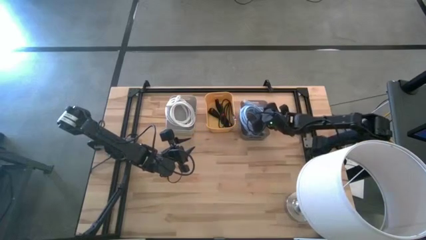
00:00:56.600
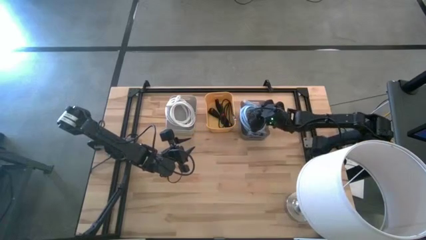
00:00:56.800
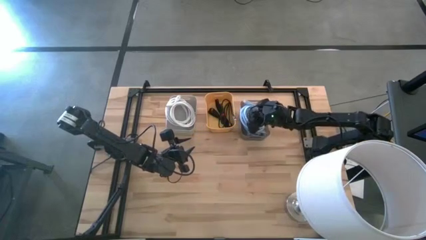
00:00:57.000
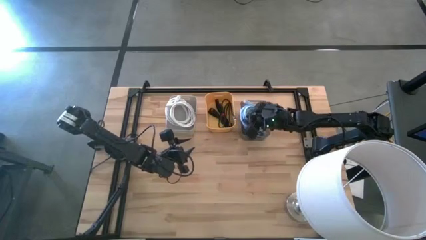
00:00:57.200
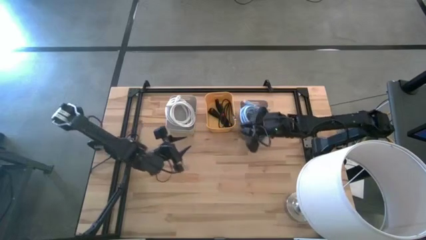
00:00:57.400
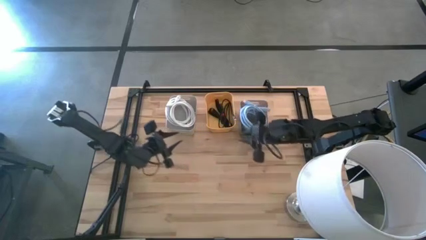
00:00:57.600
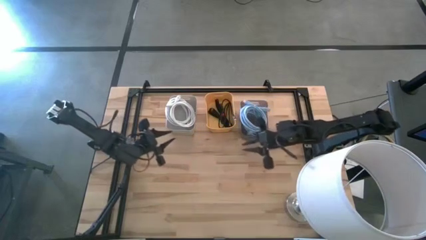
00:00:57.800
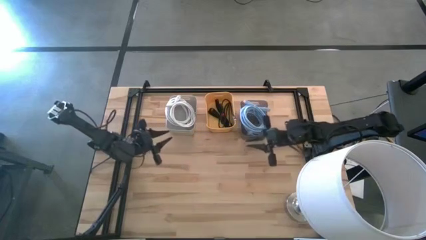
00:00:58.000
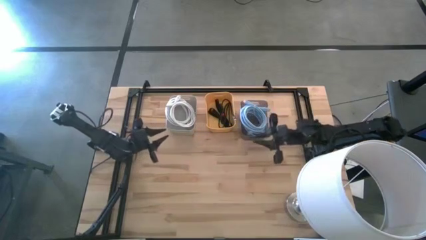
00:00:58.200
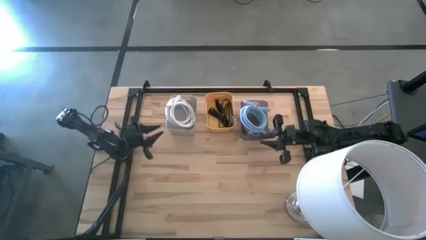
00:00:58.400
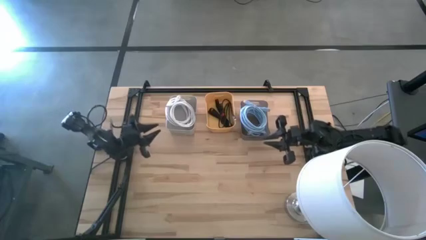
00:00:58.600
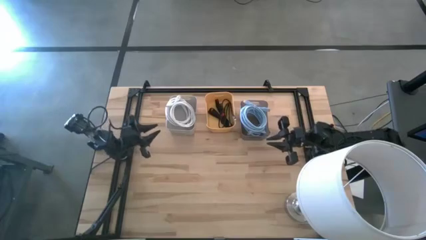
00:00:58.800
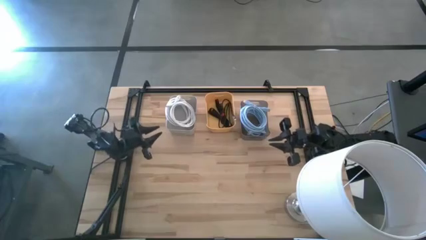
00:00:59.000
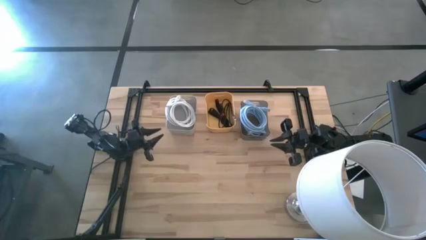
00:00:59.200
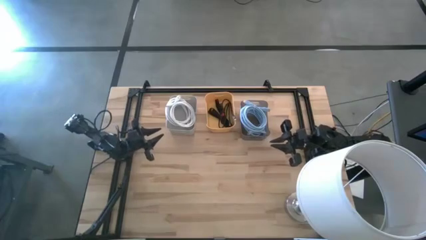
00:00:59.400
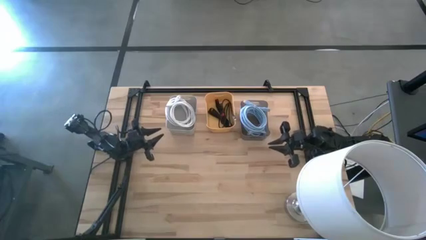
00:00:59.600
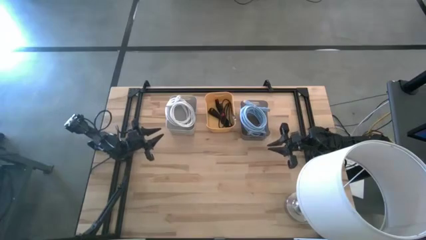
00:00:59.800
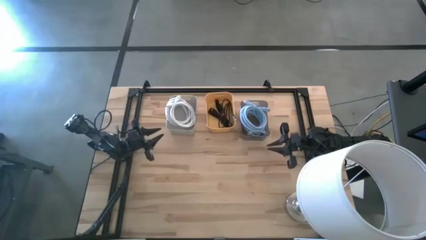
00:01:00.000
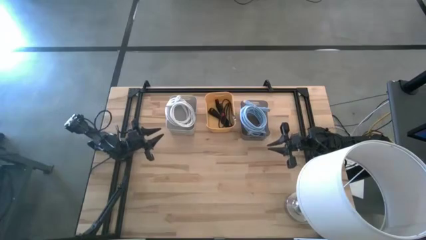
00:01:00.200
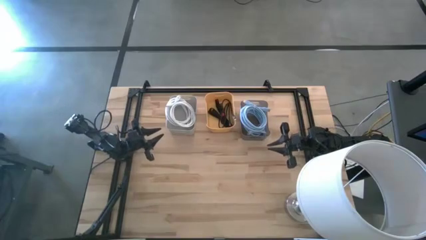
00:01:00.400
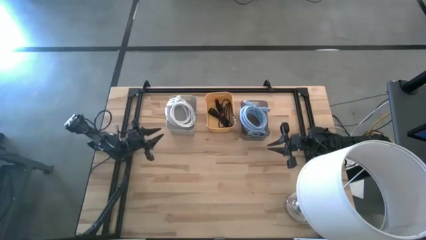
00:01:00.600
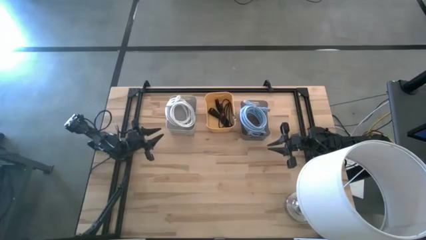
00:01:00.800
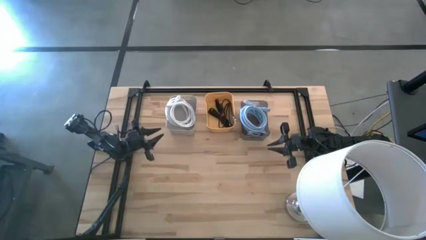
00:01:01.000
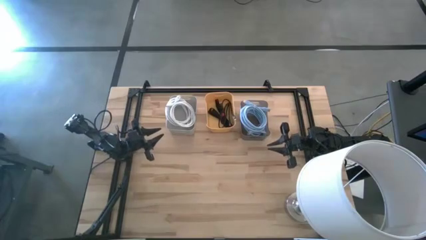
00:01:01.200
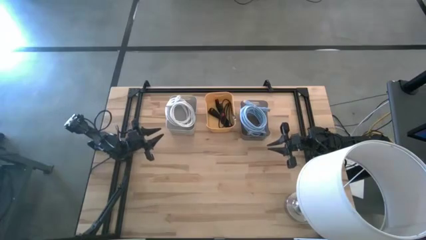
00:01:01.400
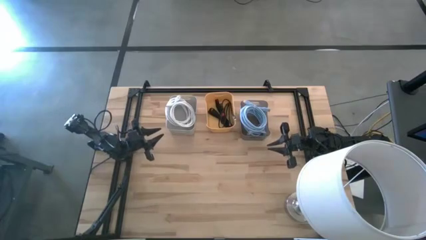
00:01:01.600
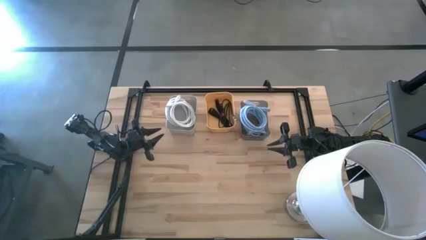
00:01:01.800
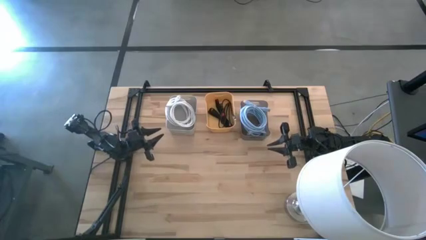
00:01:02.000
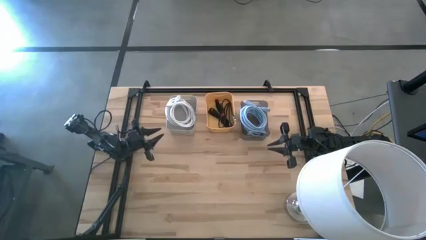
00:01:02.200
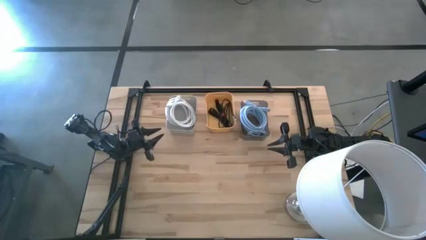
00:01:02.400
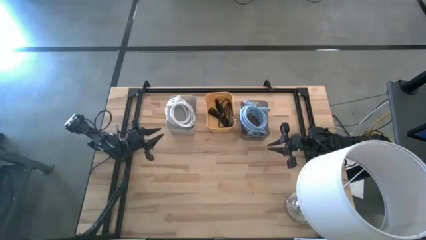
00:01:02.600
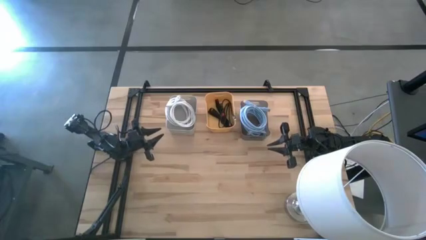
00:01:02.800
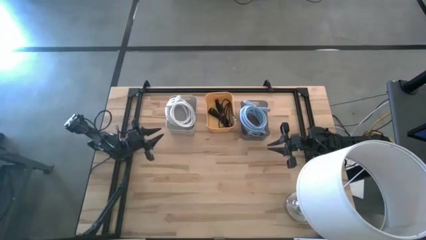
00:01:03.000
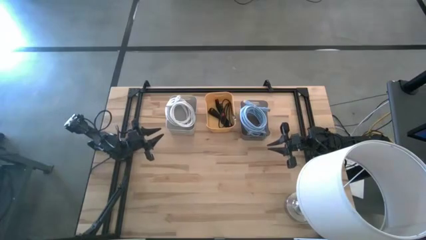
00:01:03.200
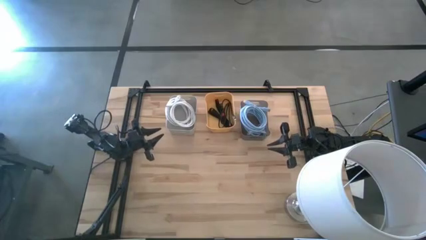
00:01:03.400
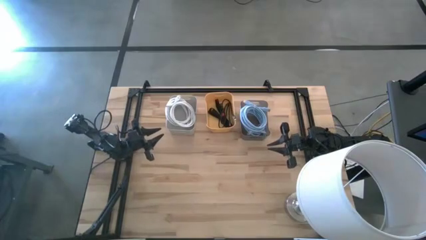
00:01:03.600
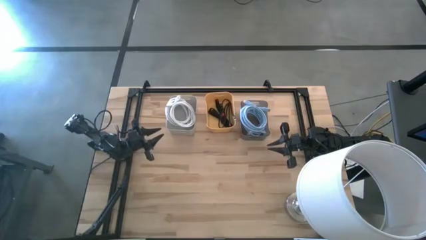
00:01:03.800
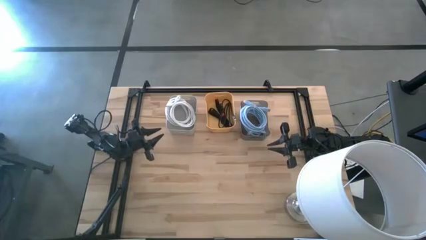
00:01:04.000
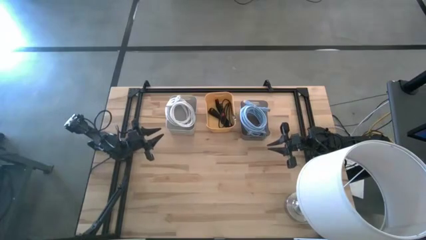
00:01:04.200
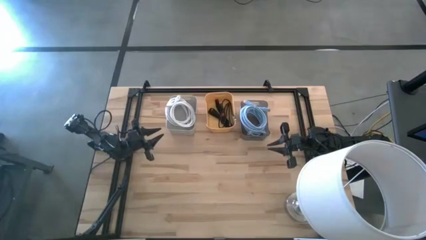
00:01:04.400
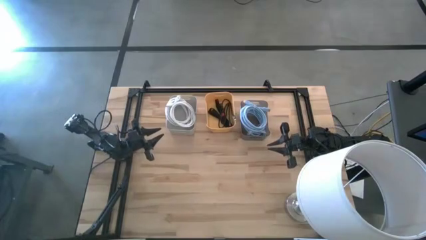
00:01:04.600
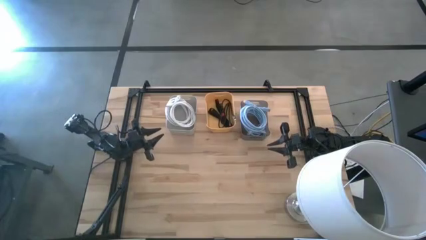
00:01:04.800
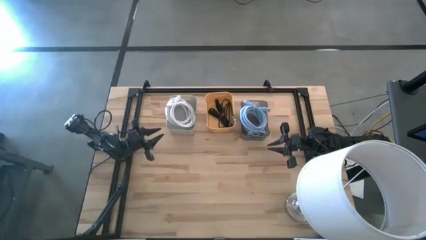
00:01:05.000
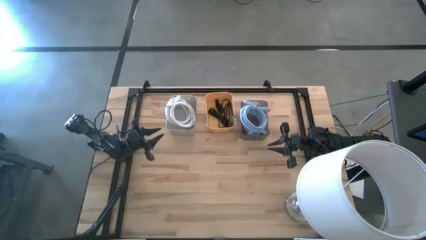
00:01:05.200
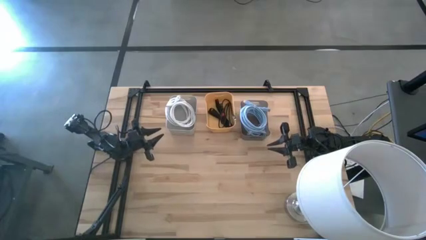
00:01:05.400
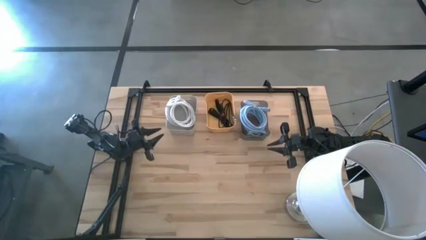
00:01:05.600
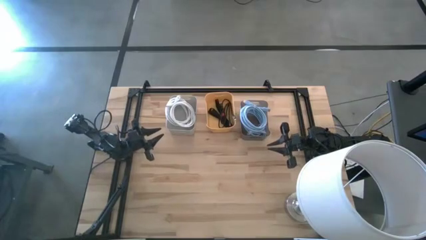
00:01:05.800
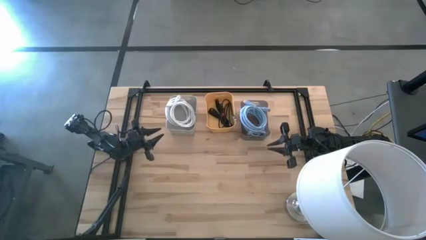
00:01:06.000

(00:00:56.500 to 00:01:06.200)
Task: Sort HDMI cables
Return to Home Position

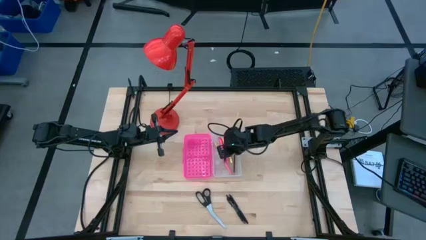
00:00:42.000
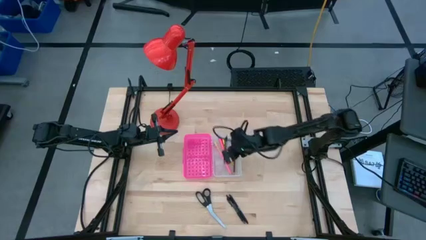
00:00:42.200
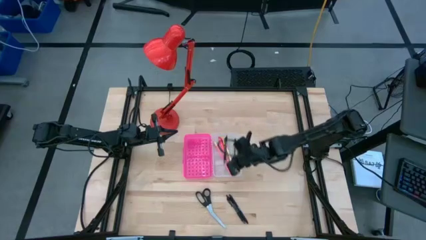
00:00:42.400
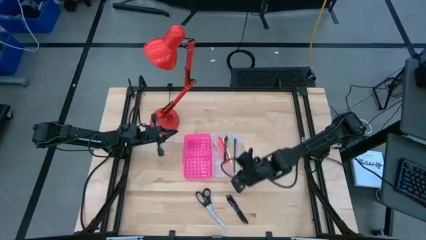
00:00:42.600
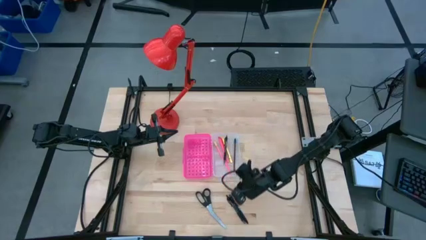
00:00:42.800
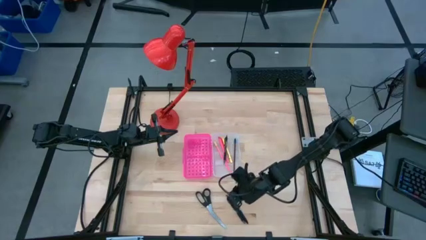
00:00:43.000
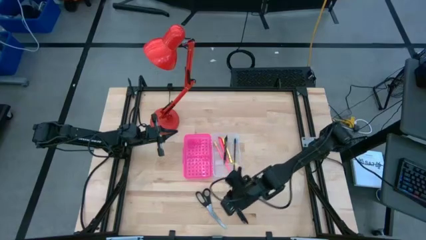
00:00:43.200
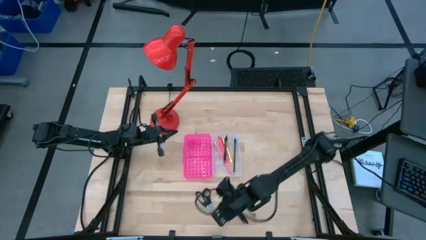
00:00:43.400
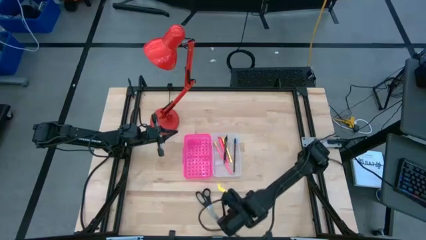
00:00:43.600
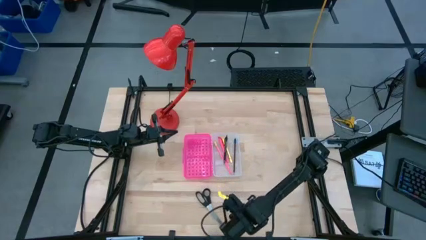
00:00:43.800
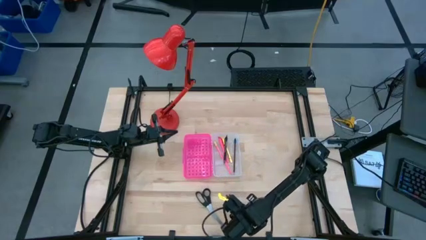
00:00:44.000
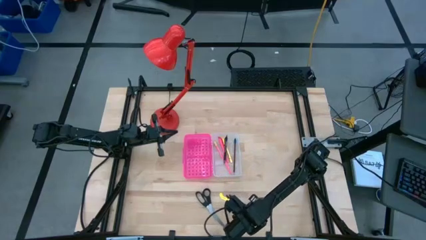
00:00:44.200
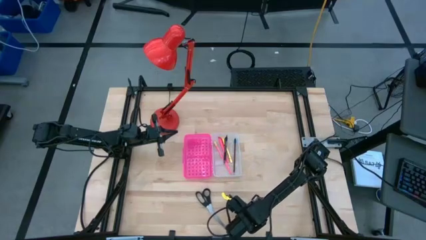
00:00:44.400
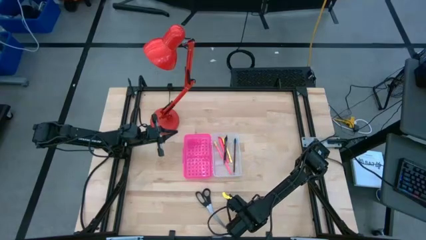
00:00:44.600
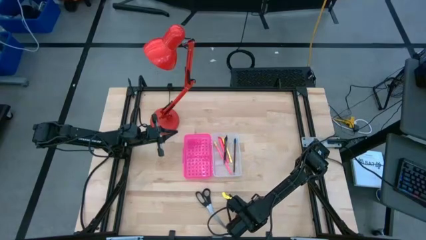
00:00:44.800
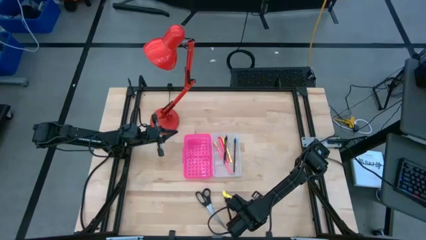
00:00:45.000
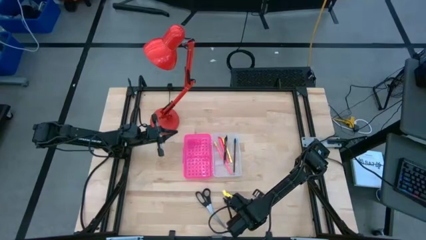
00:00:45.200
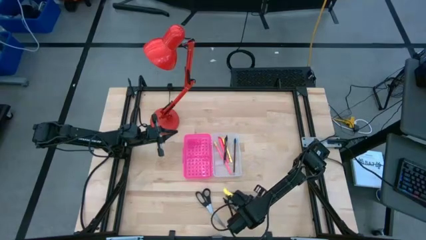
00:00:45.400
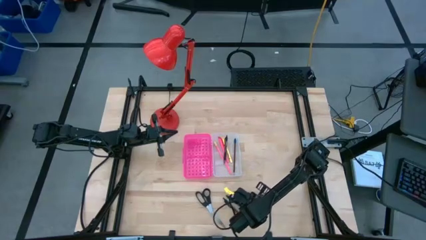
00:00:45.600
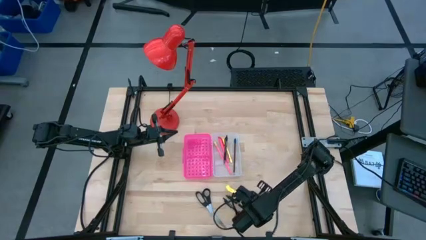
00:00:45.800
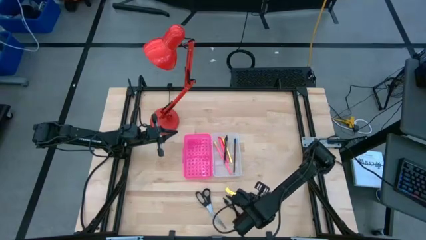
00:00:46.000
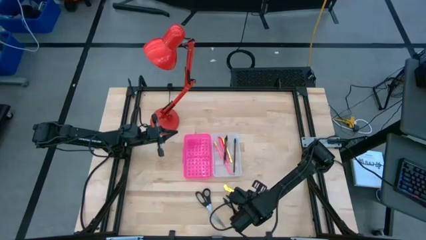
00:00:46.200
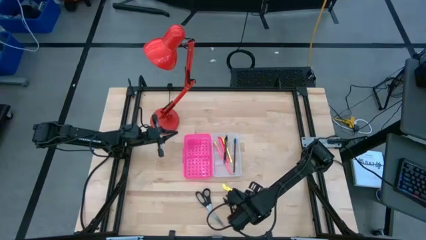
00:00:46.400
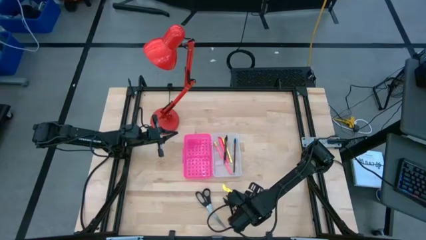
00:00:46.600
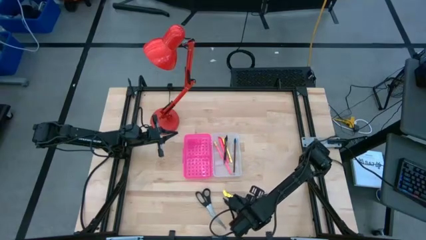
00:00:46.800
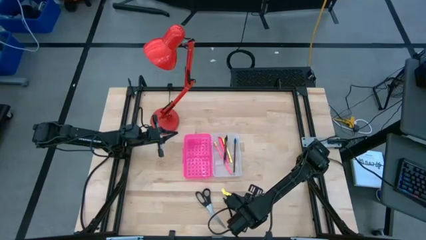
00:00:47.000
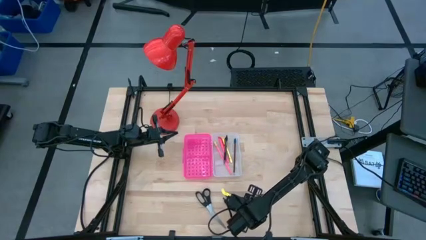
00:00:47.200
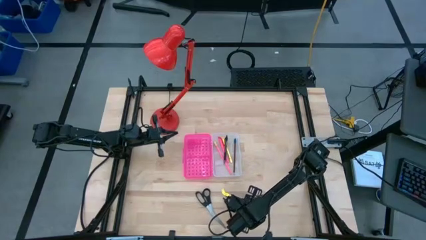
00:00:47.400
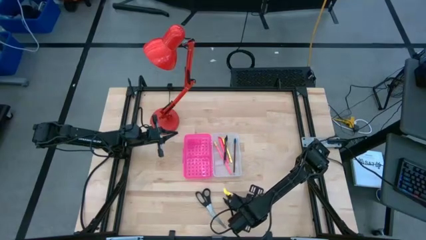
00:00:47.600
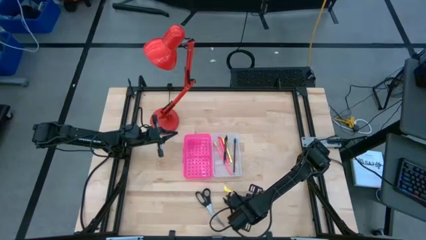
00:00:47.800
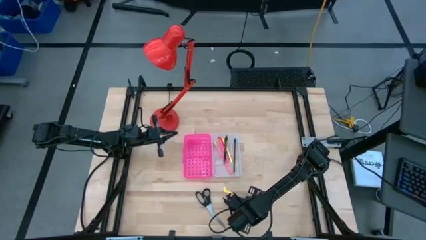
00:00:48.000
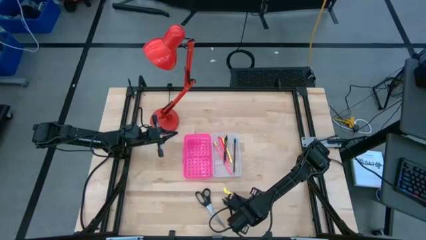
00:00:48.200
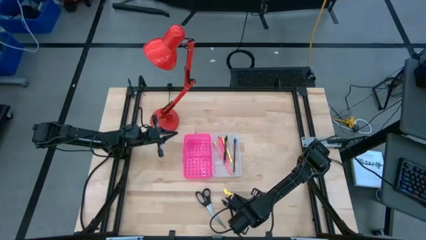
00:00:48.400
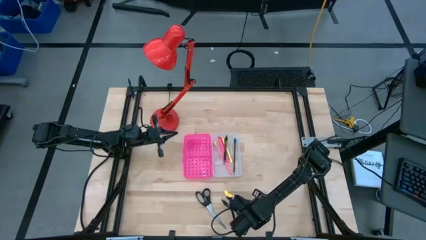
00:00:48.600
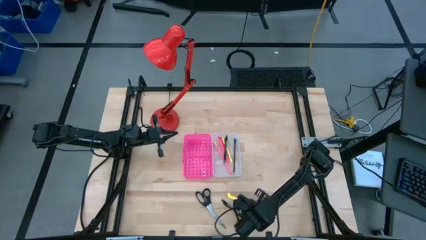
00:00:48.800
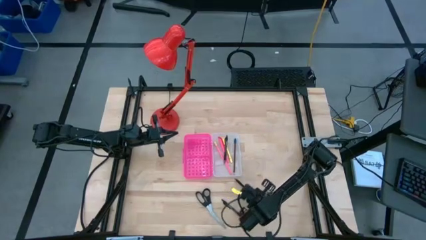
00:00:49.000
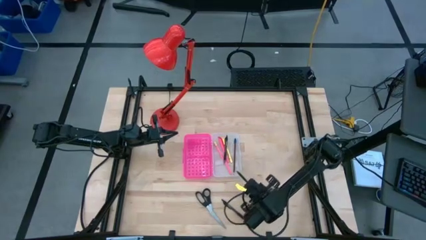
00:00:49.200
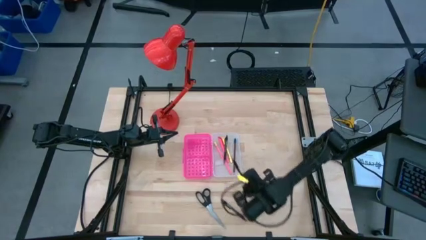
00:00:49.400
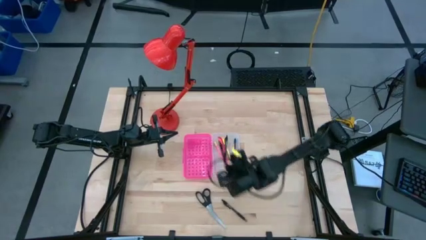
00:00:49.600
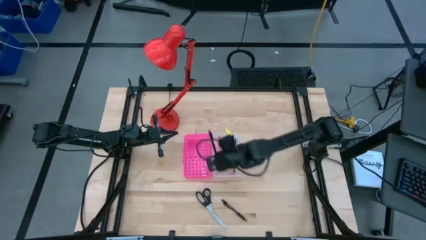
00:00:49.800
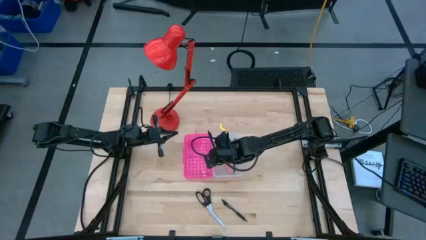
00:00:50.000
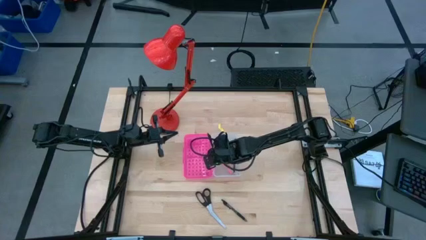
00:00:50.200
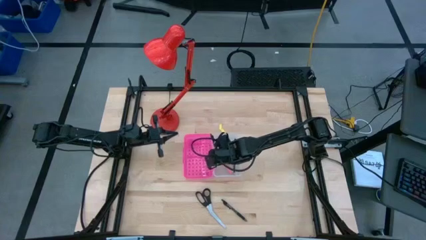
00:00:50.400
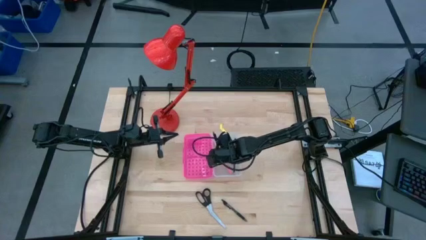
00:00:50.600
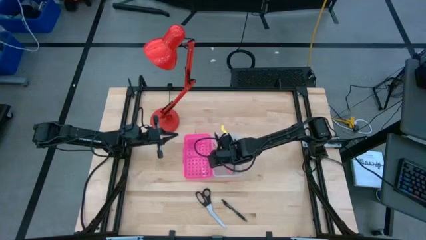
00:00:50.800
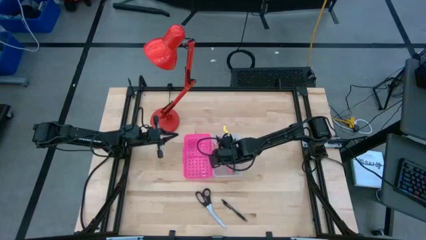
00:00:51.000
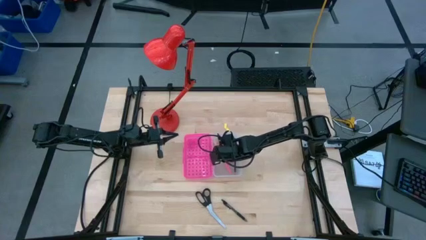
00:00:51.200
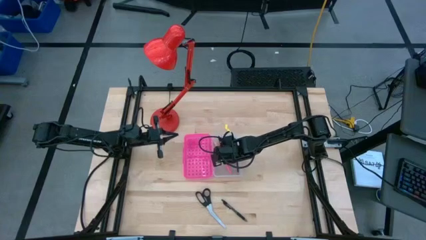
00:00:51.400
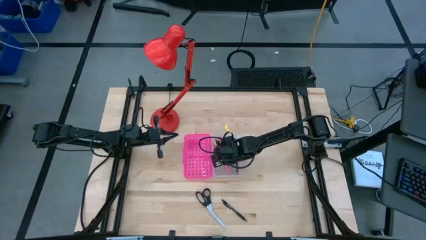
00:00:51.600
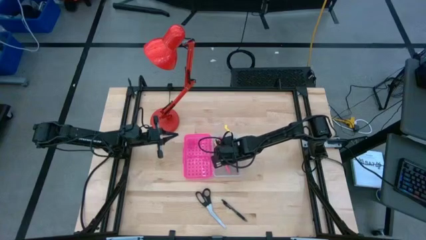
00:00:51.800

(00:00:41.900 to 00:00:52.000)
Task: Pick & place school supplies into a supply box
Put the right black pen into the pink supply box
